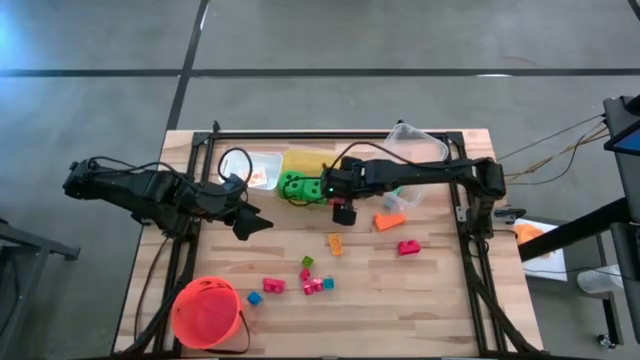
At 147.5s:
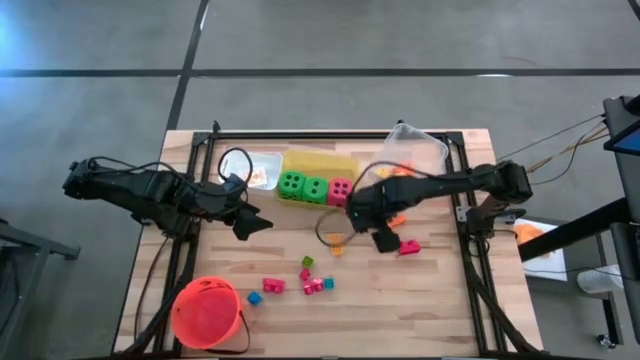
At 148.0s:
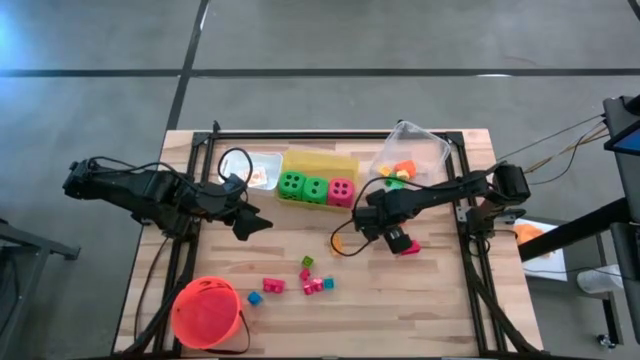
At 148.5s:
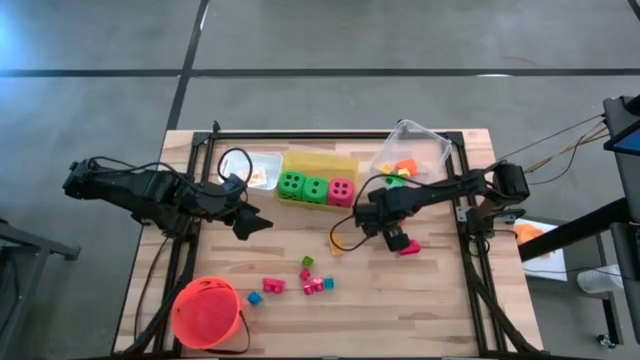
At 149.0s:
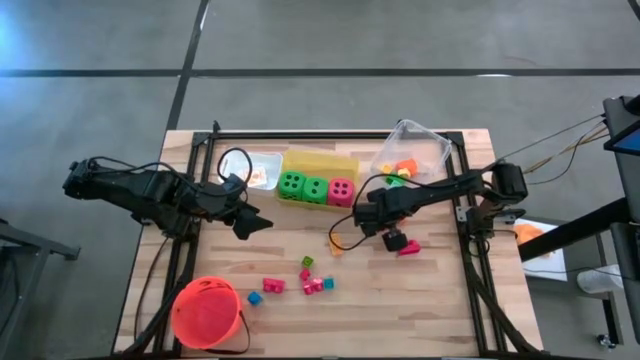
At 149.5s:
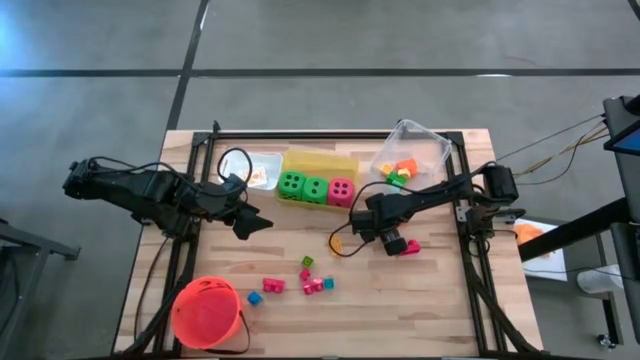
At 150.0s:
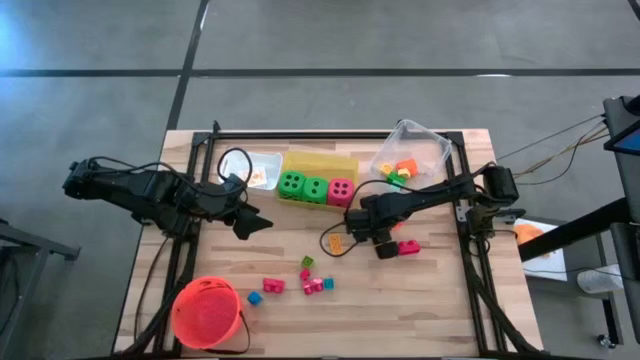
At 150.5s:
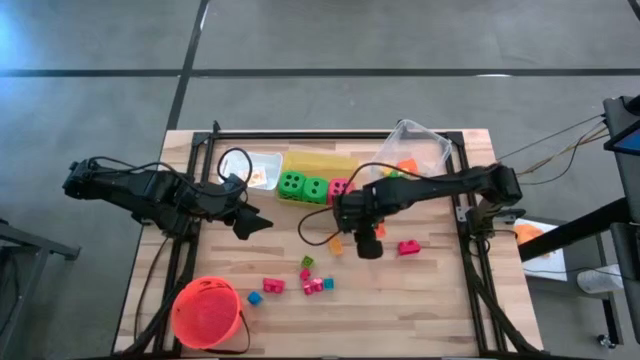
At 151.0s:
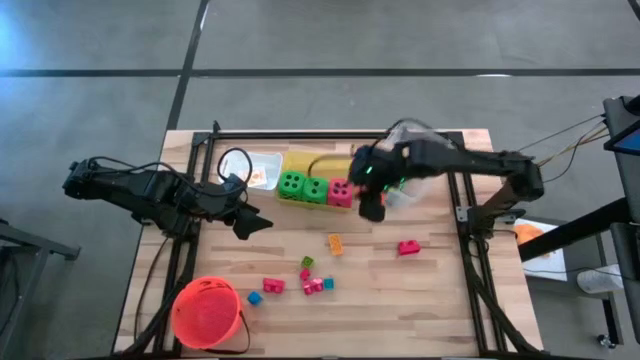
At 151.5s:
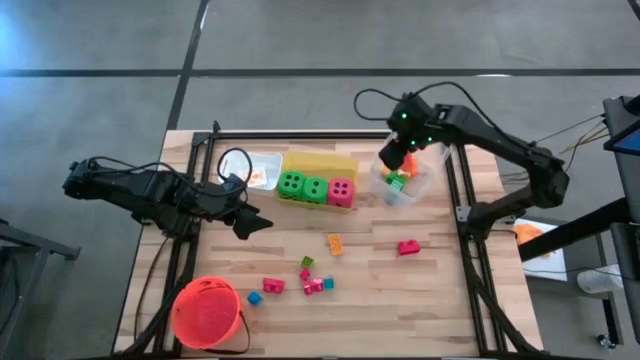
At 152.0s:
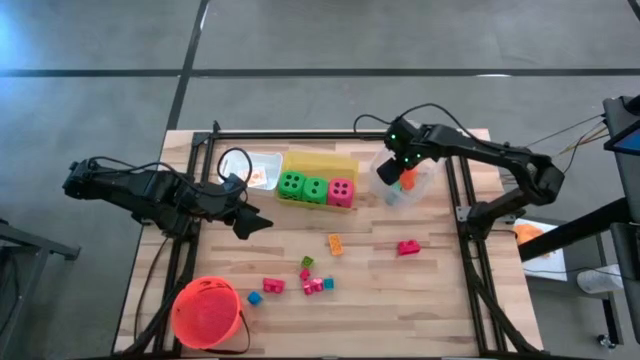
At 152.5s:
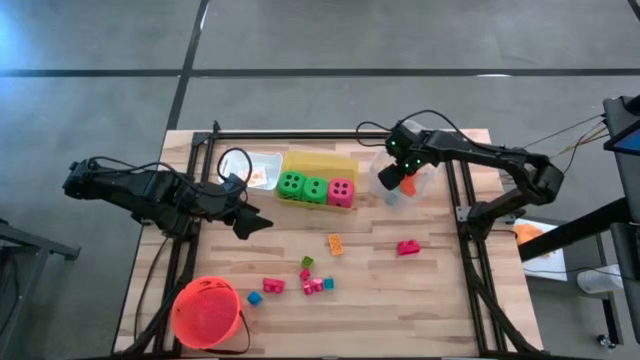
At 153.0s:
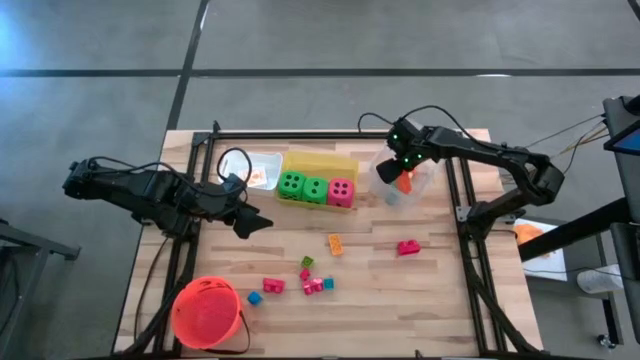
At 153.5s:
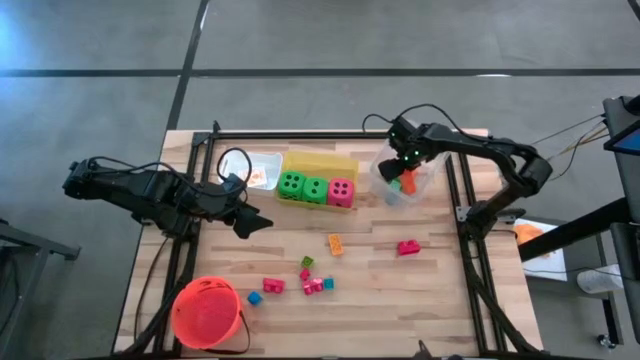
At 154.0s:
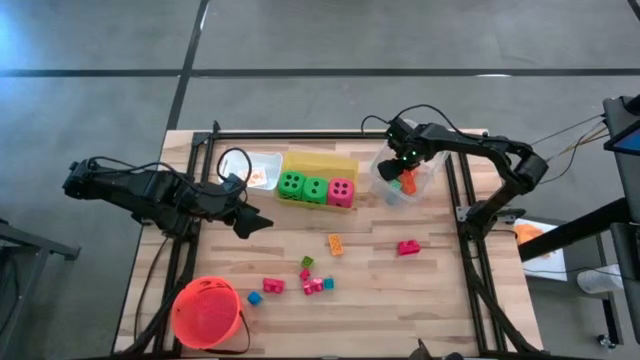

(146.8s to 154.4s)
Task: Pick & Place Toys
Put the orange game piece into the transparent bin

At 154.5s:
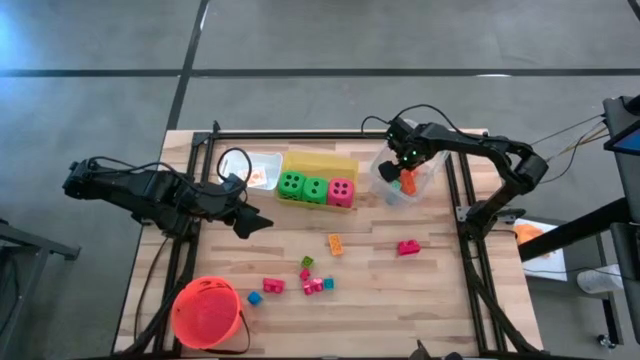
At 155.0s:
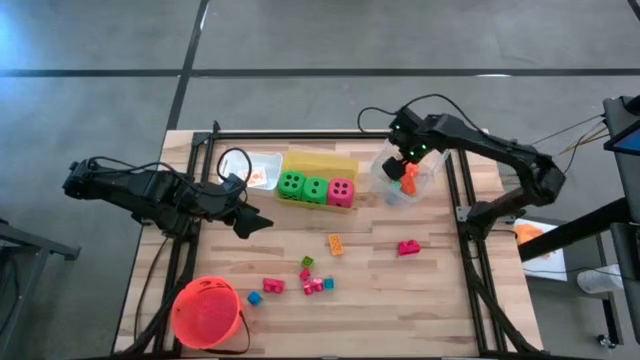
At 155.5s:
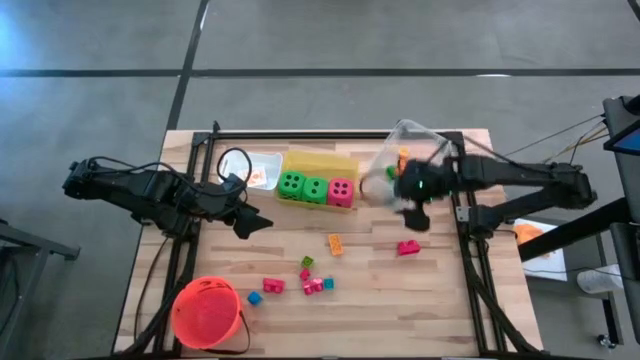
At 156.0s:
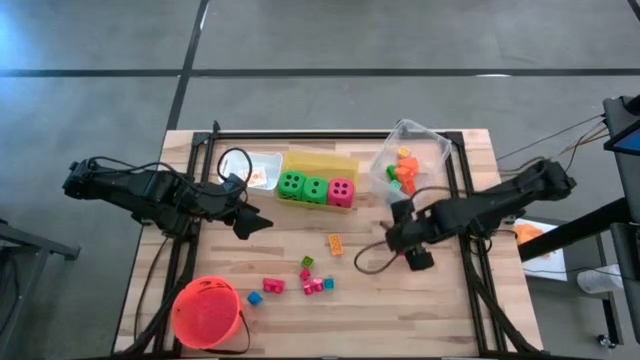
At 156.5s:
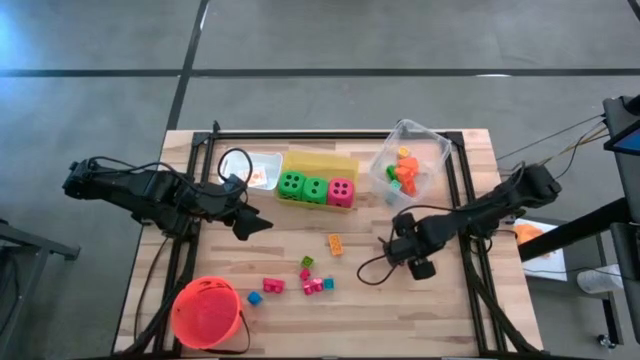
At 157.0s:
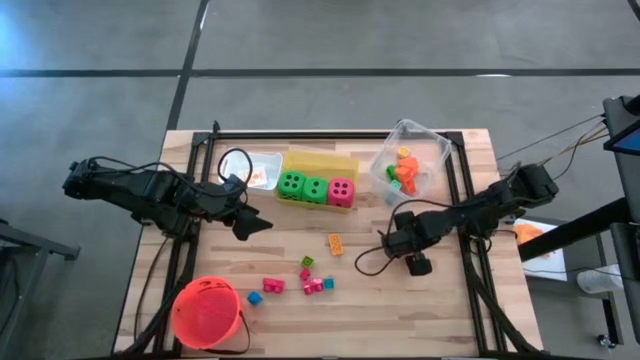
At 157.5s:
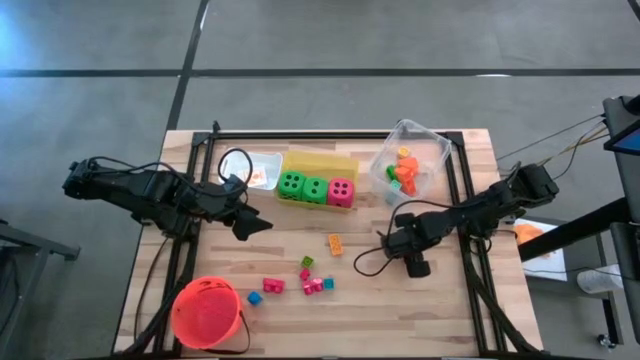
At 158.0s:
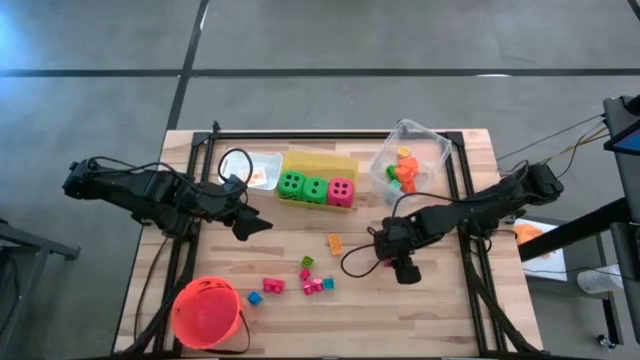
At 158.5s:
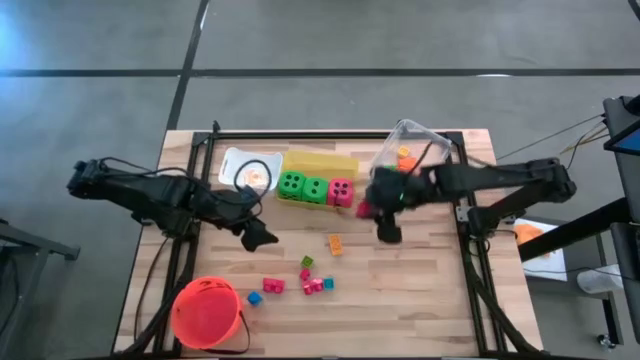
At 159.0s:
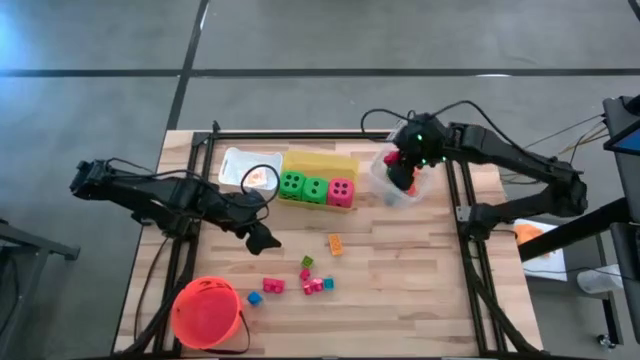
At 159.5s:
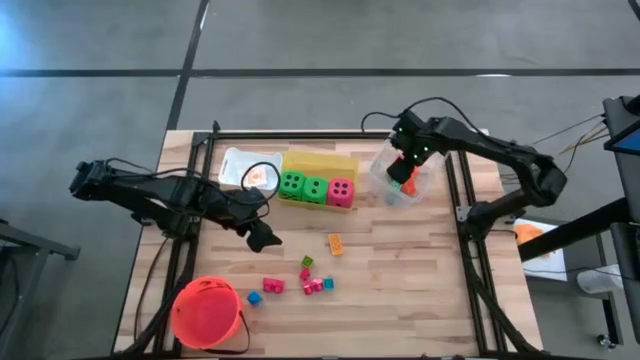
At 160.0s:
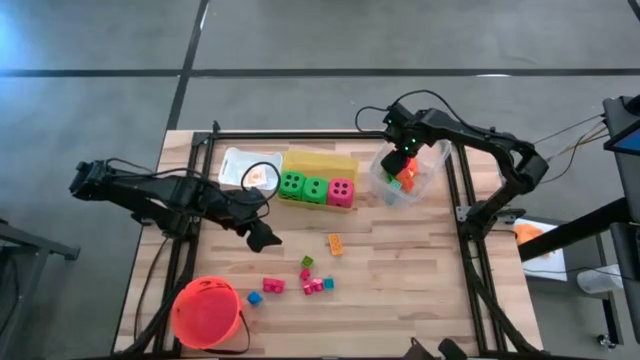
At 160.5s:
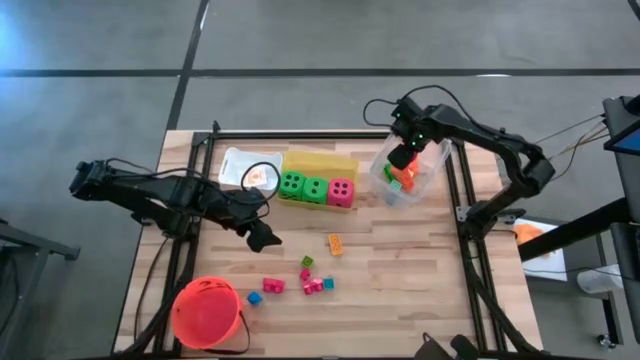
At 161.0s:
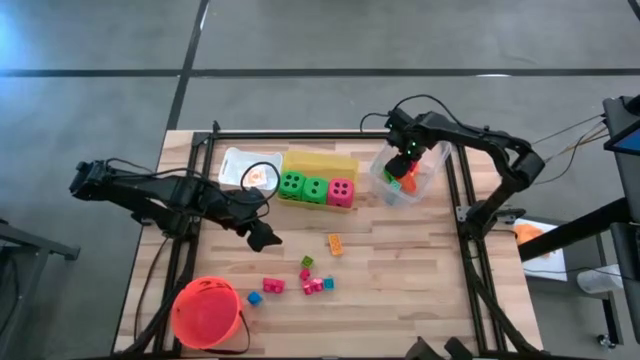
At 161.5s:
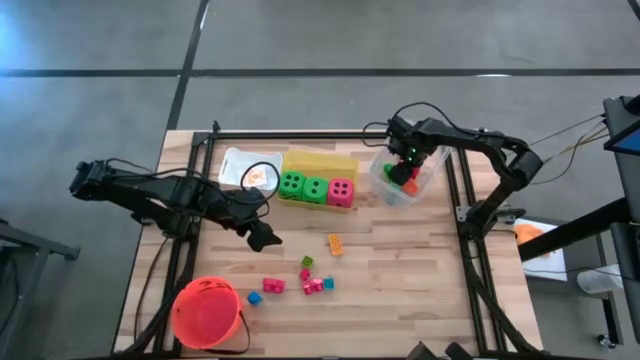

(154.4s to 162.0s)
Put the top right red game piece into the transparent bin

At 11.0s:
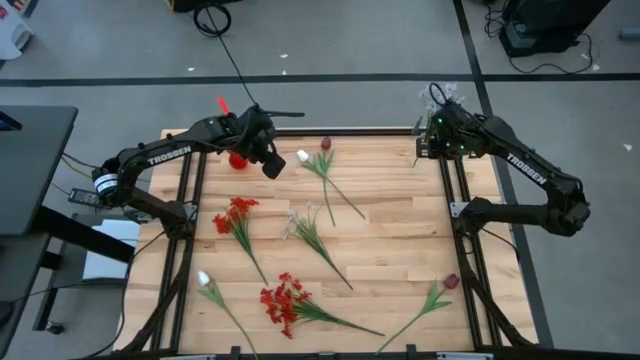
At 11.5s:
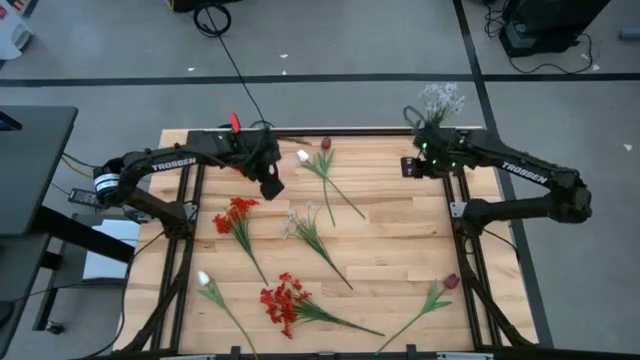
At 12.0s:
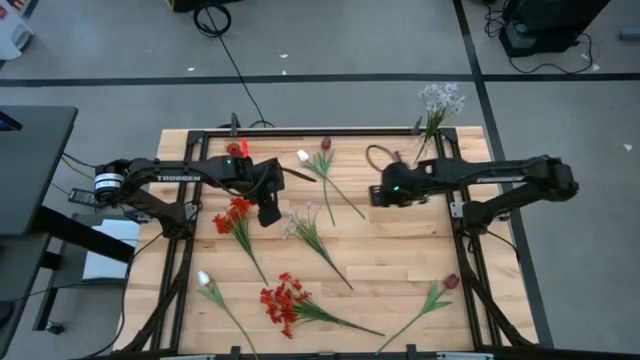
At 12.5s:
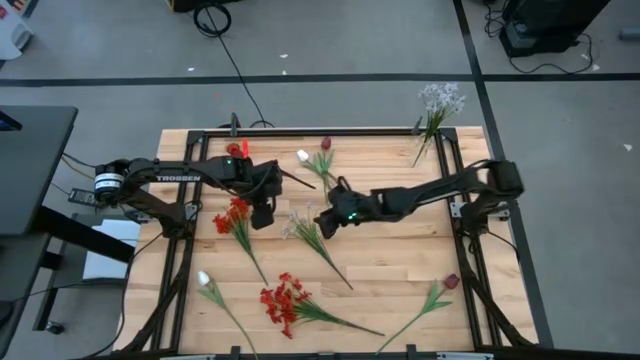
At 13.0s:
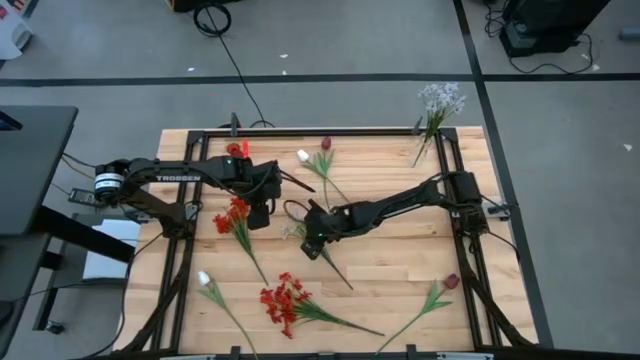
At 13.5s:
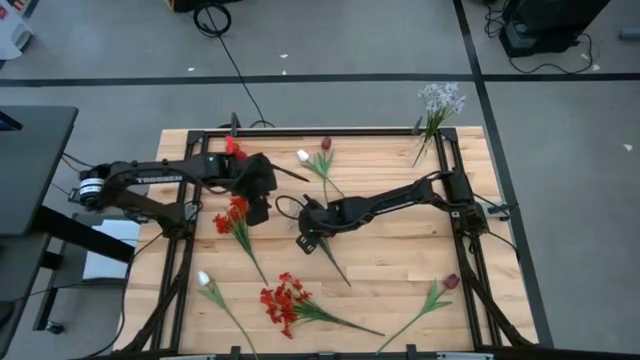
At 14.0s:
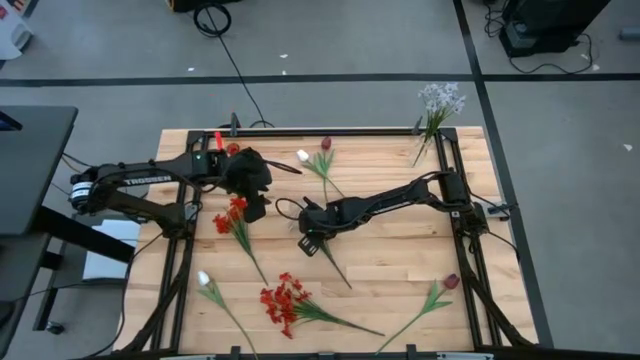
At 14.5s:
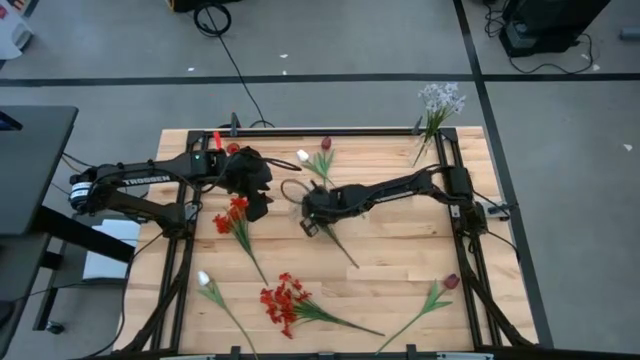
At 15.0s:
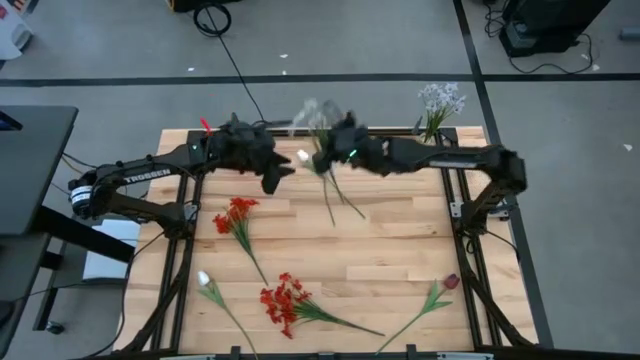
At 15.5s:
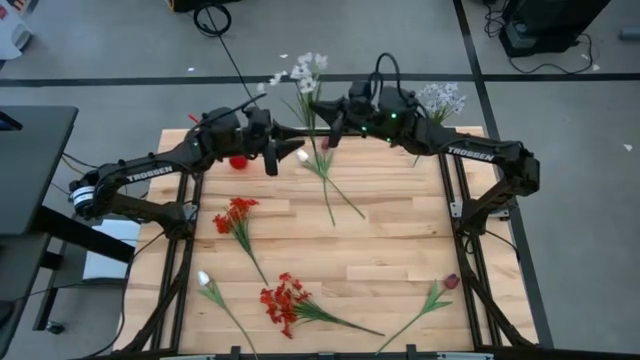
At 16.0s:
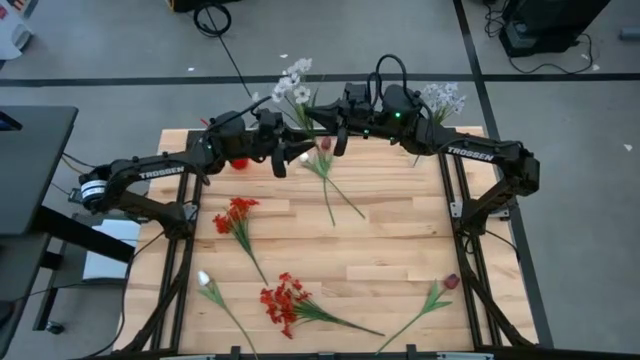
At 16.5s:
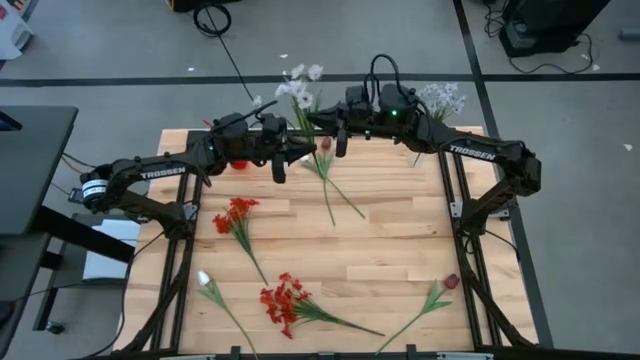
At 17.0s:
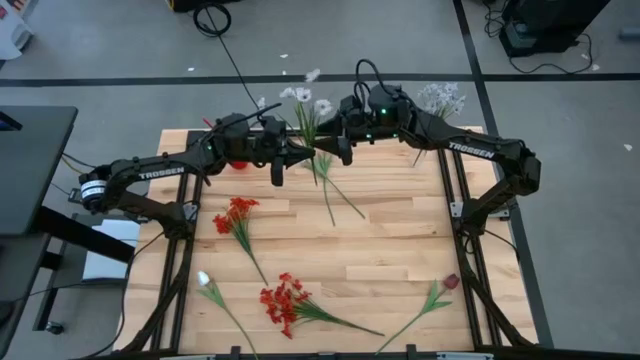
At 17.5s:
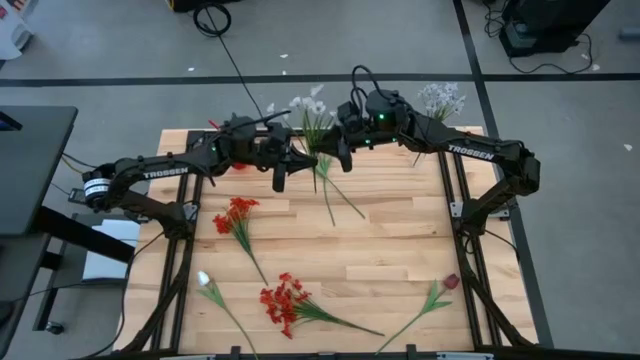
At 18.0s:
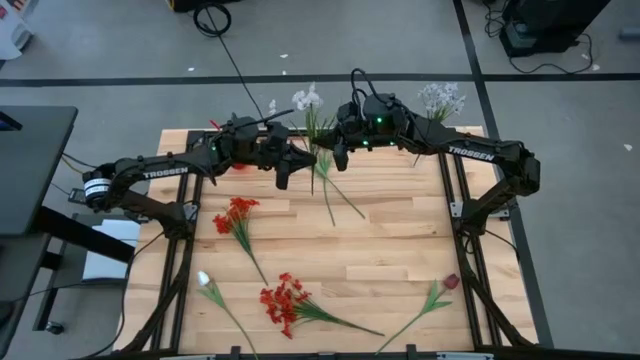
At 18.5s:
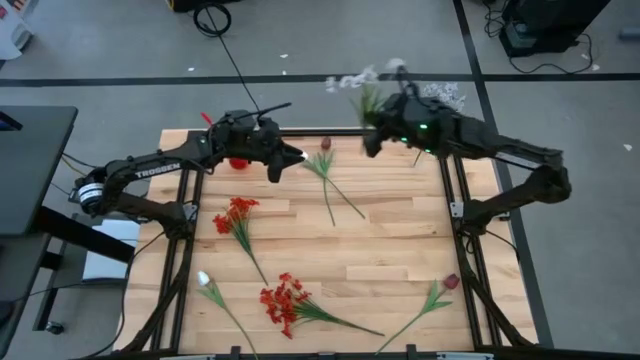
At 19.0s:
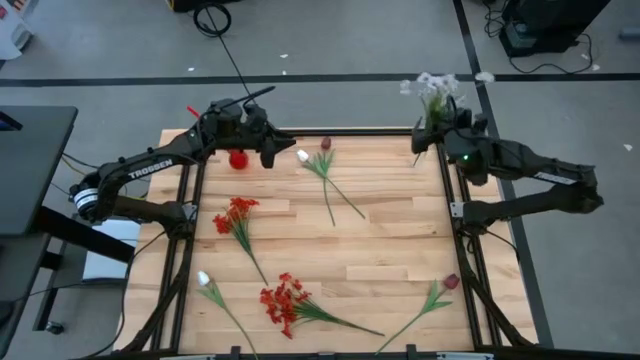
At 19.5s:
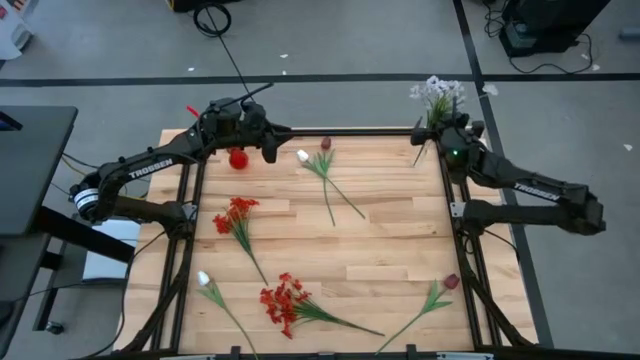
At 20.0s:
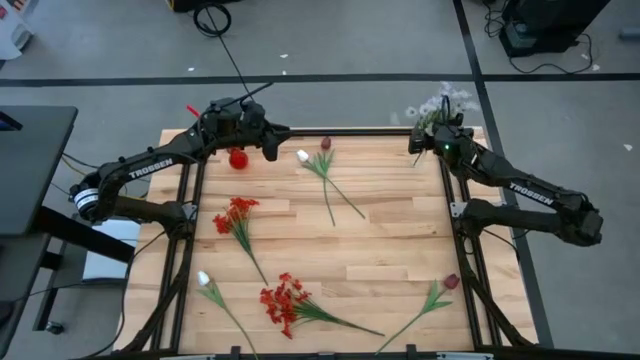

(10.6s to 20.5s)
Task: Sort flowers into vase by color
Put the white flowers into the transparent vase
